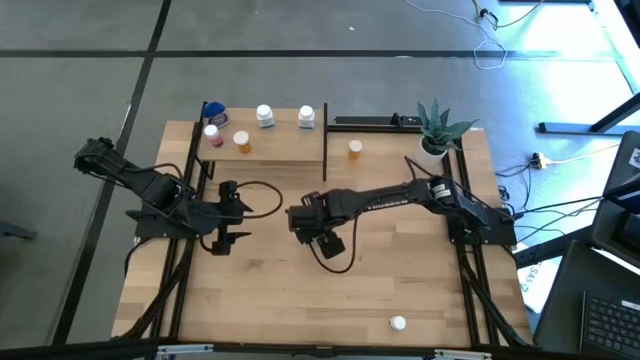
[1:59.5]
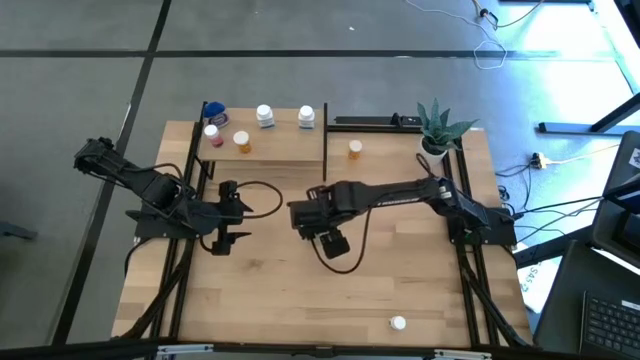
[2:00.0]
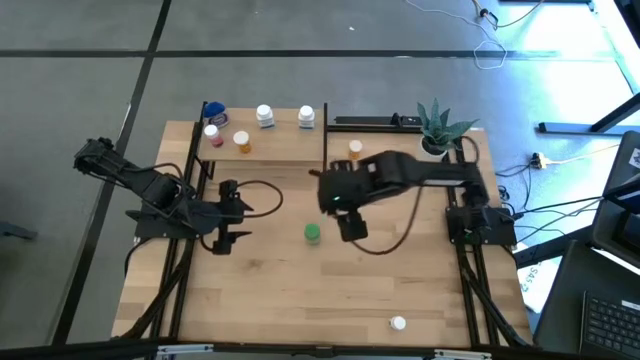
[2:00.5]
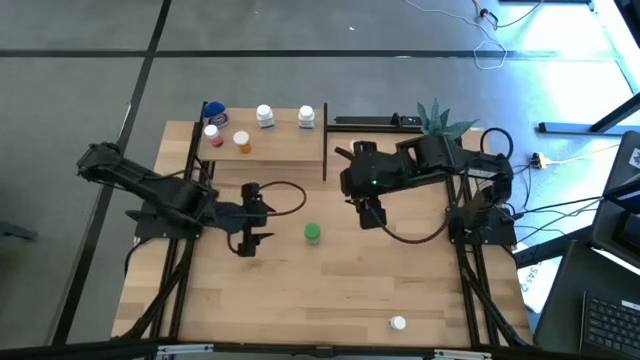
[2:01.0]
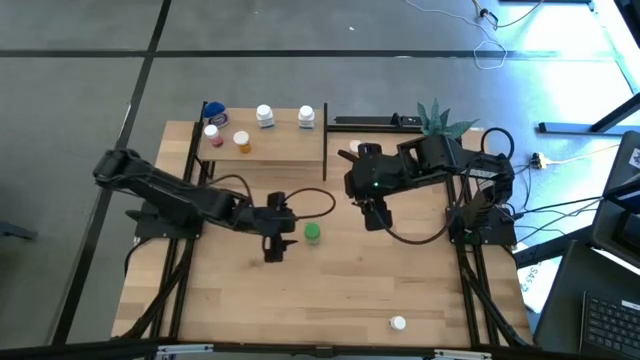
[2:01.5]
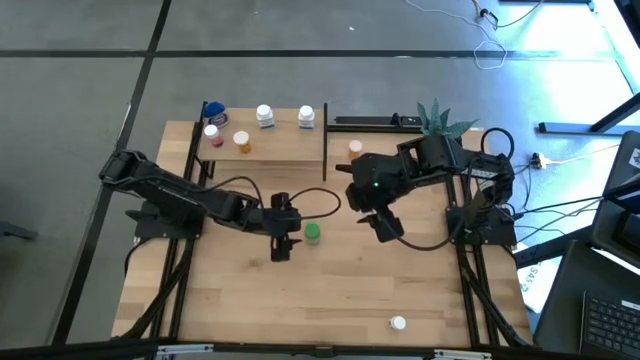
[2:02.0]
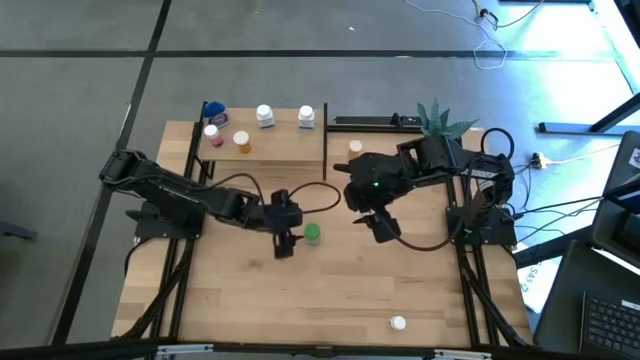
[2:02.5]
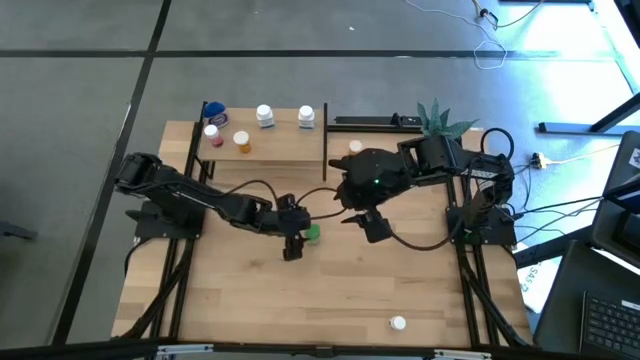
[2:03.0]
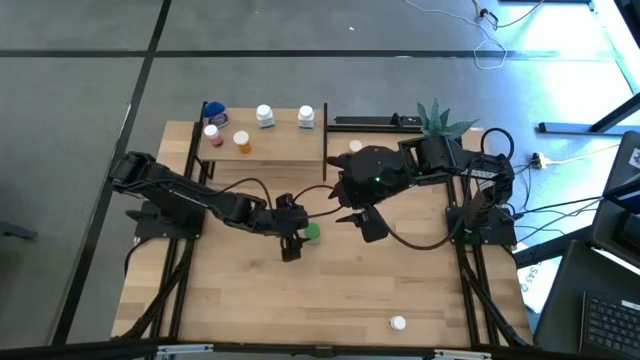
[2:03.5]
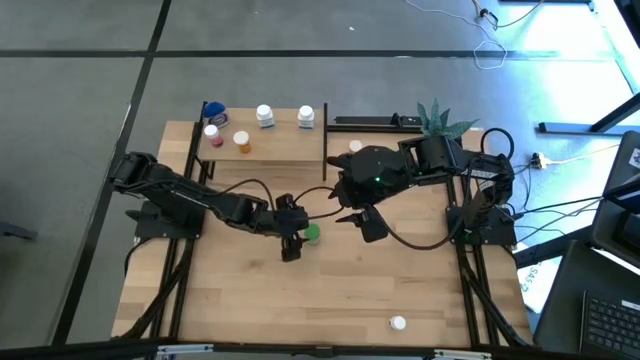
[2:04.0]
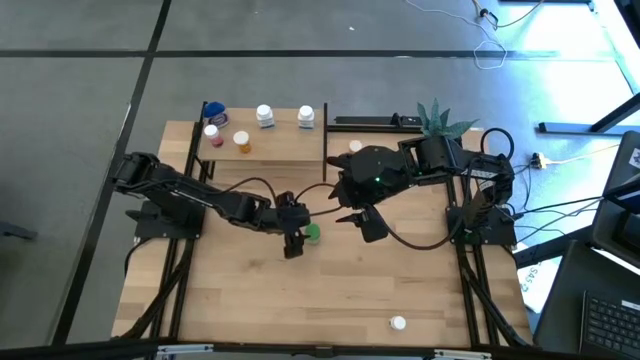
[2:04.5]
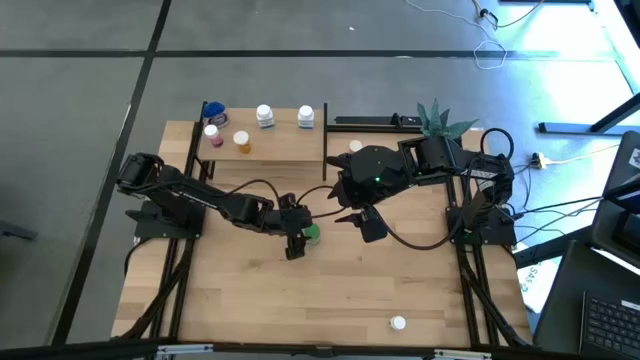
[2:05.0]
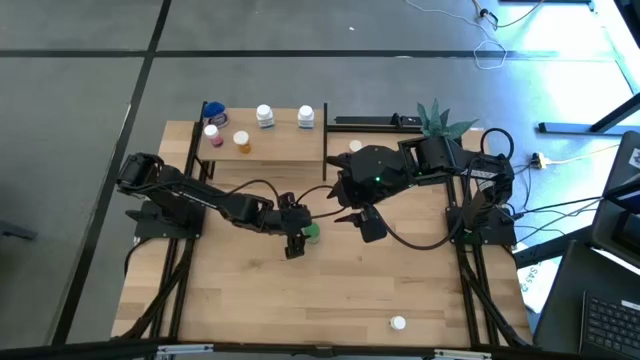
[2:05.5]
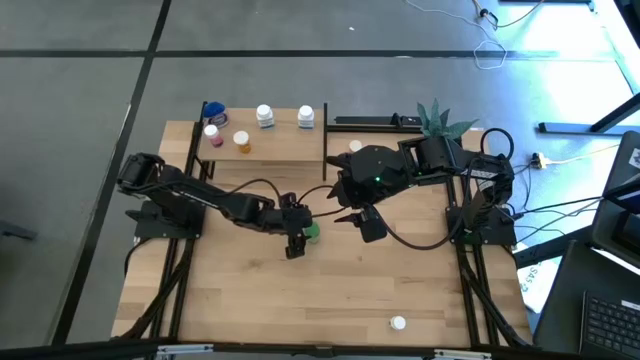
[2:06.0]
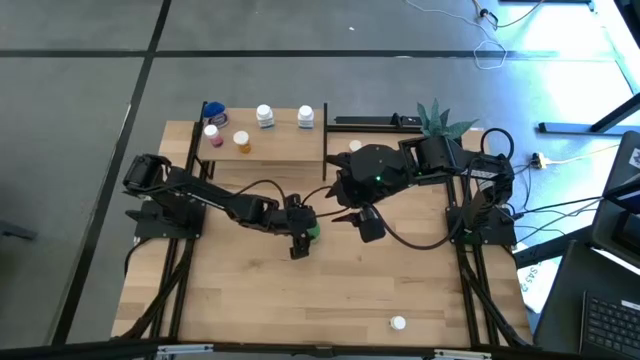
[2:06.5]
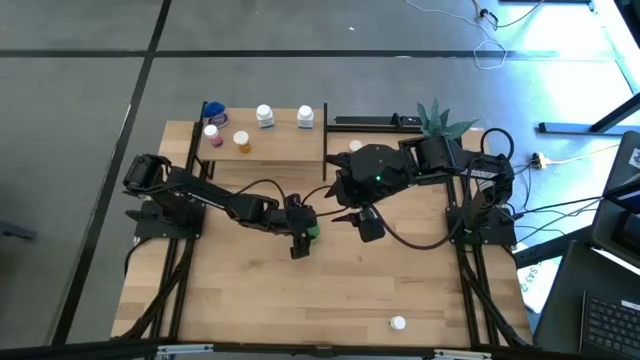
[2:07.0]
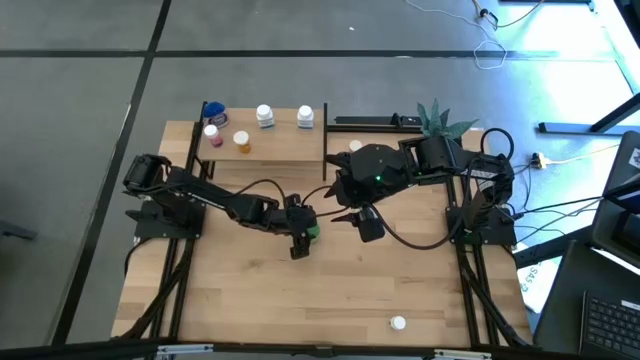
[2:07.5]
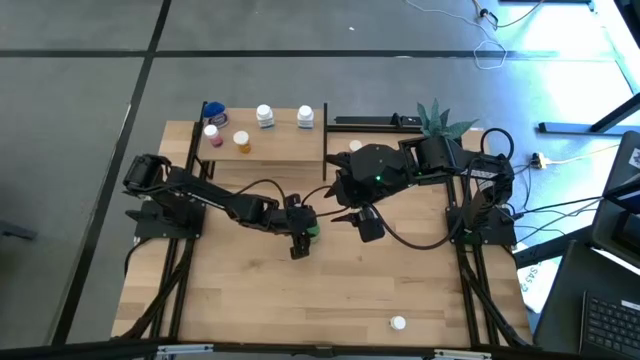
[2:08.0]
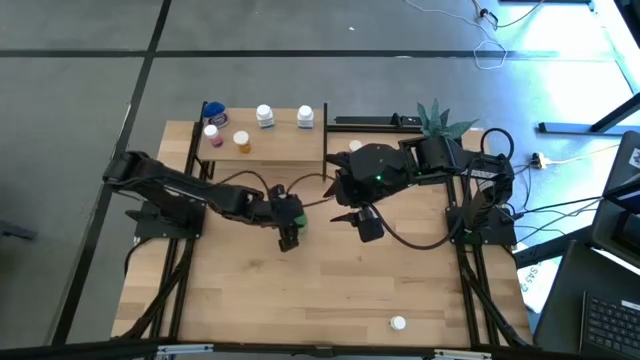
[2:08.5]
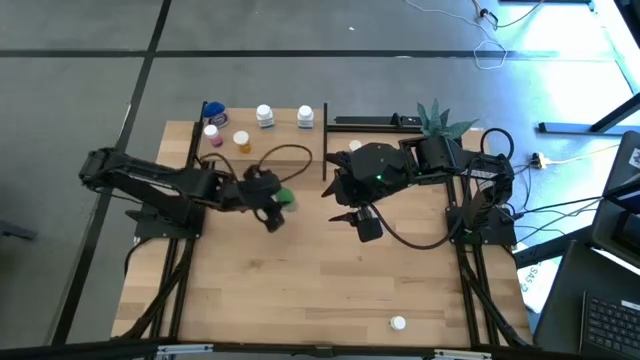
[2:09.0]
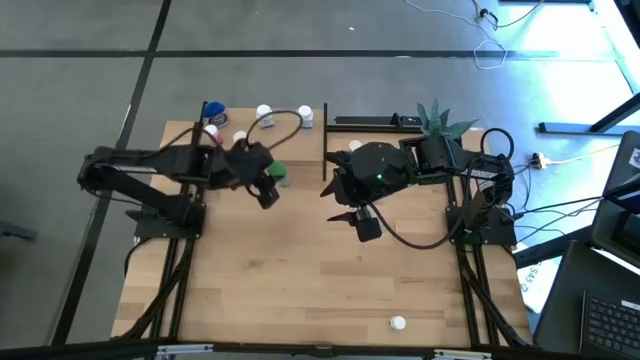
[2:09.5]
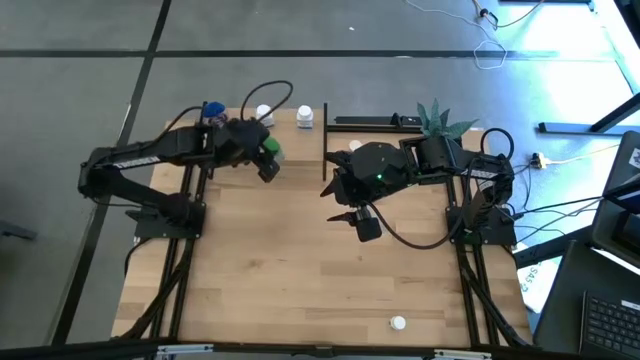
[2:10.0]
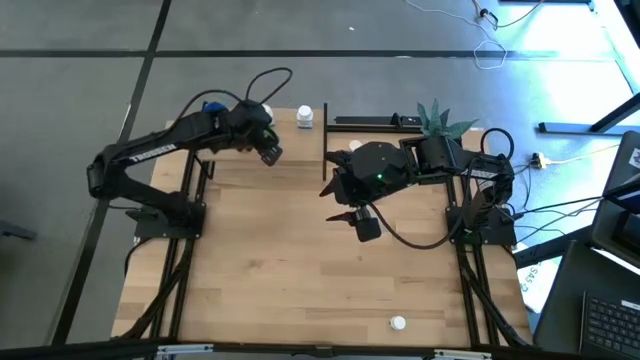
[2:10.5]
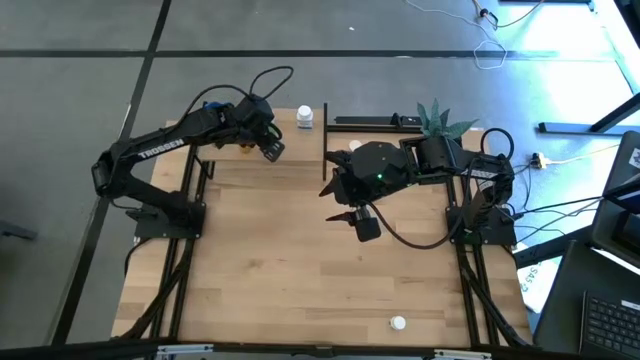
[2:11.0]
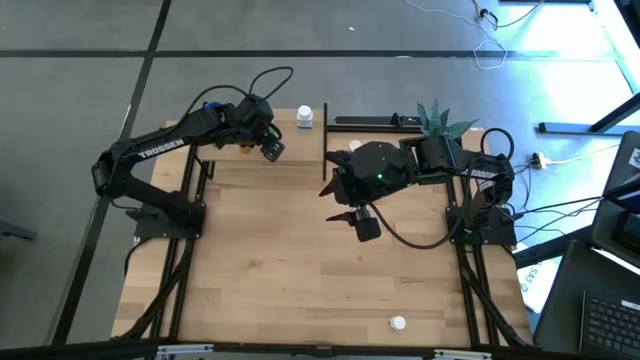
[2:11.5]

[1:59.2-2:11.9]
Task: Pick and place medicine bottles onto shelf by color
Put the green pill bottle on the shelf

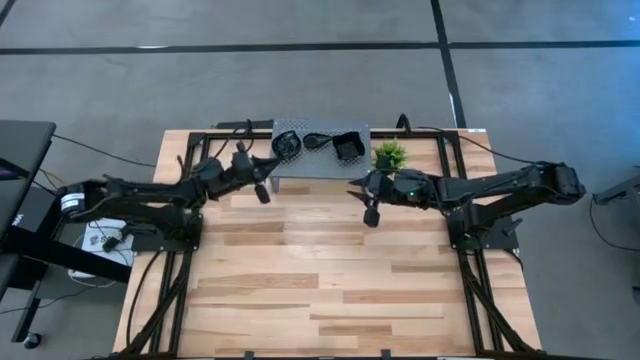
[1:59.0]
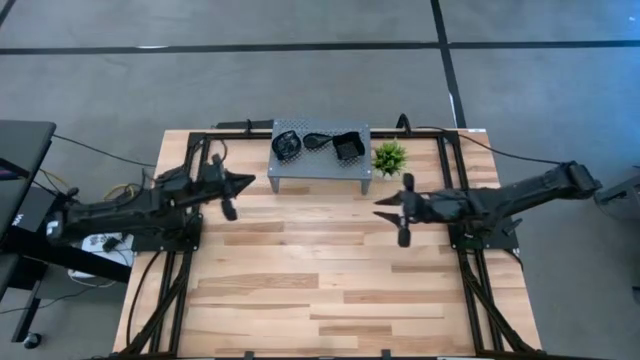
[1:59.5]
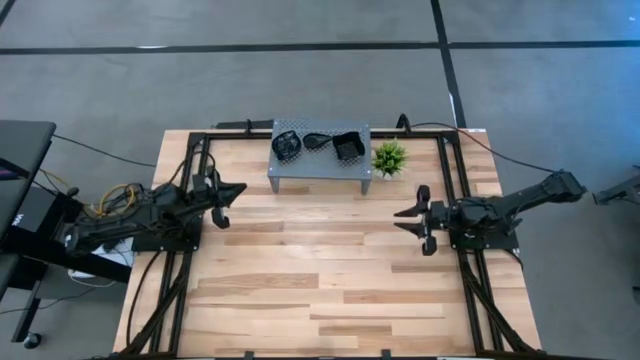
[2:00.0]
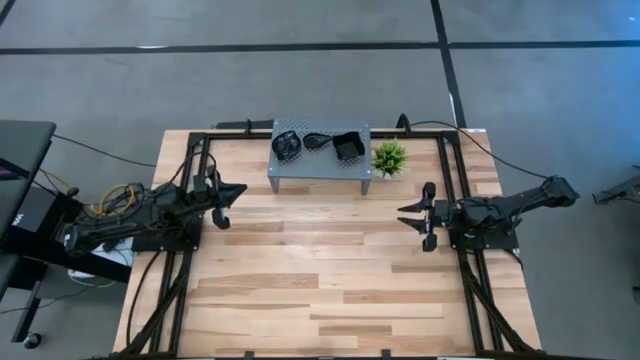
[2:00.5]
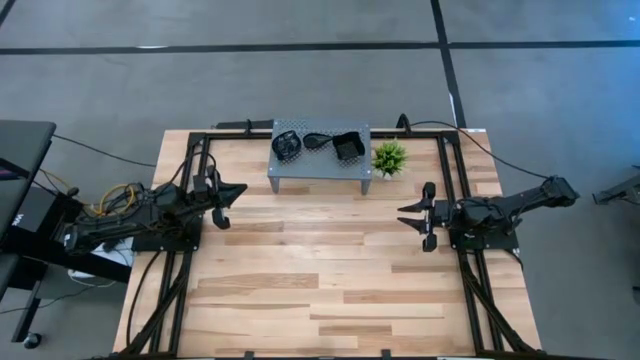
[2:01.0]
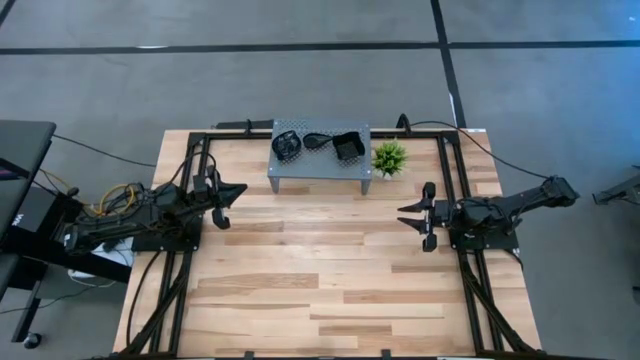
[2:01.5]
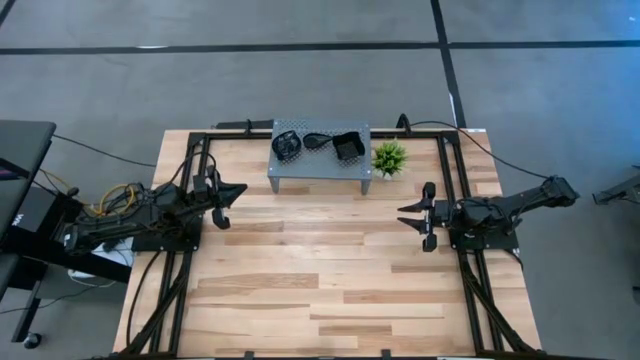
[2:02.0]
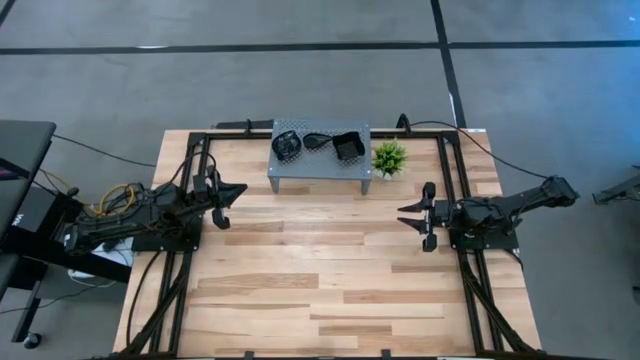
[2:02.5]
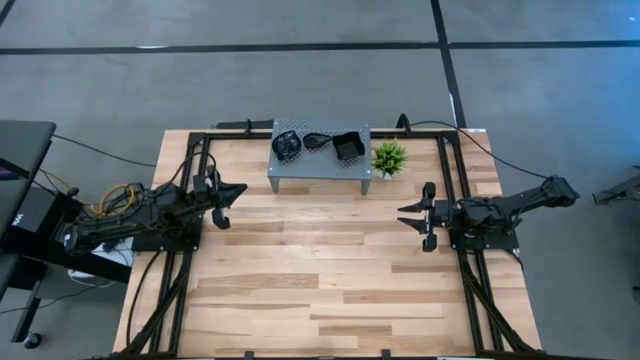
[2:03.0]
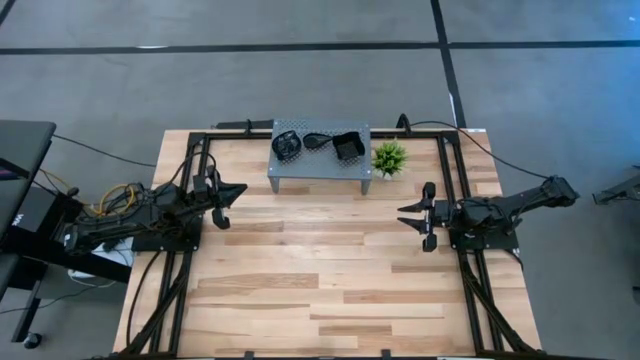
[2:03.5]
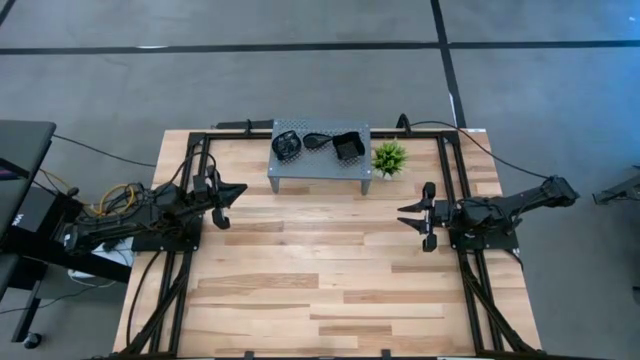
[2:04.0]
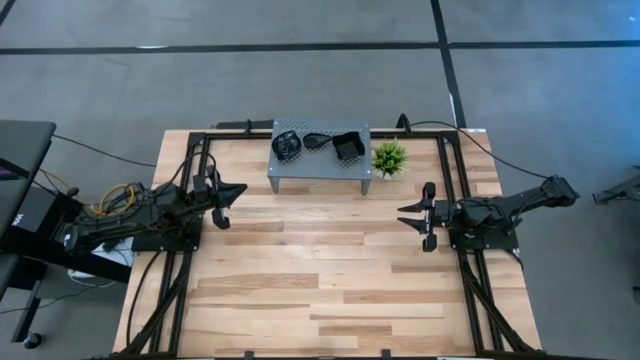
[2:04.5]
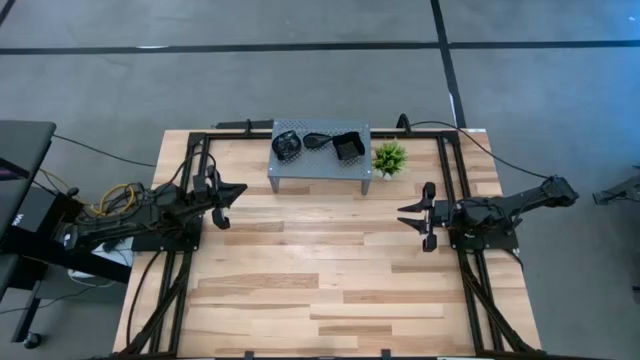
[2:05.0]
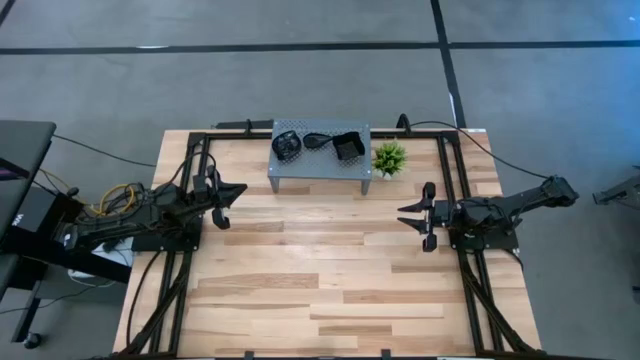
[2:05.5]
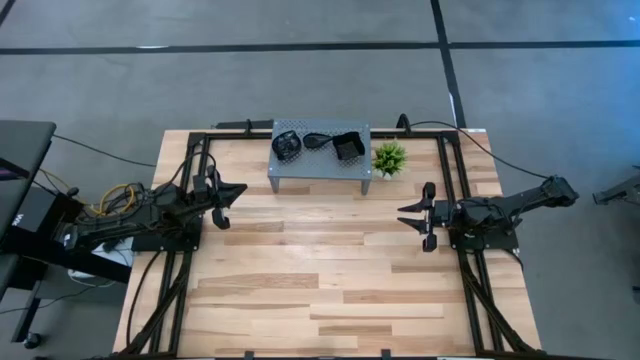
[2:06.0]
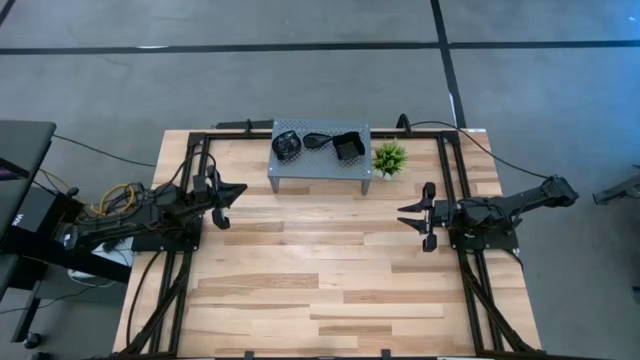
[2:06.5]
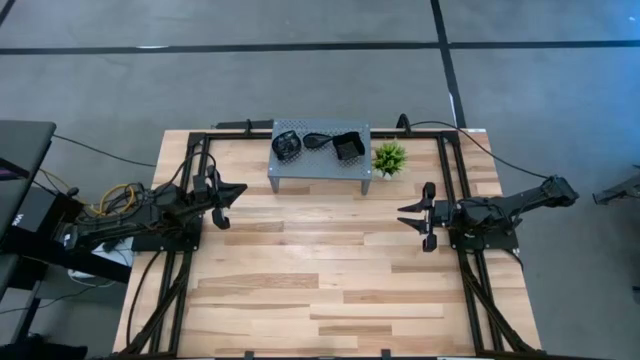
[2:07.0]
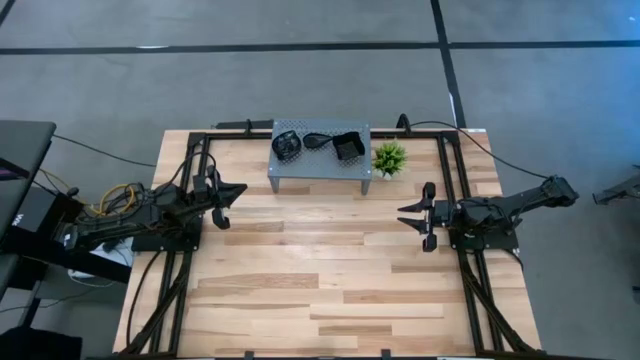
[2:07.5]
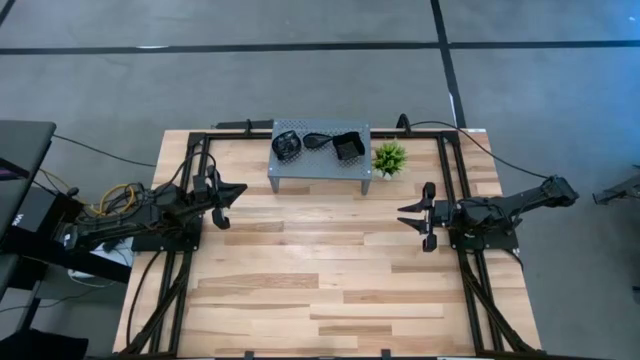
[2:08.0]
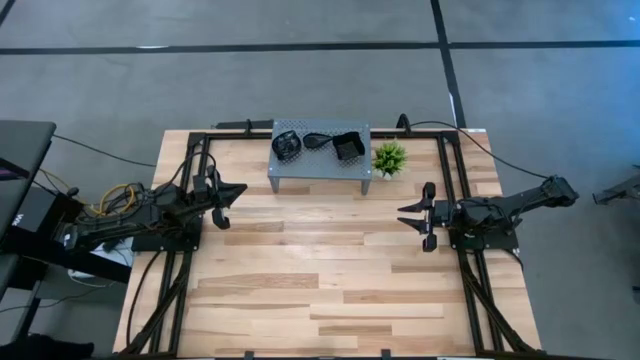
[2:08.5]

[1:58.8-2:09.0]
Task: Pick & Place Mini shaped plates
Return to Home Position
